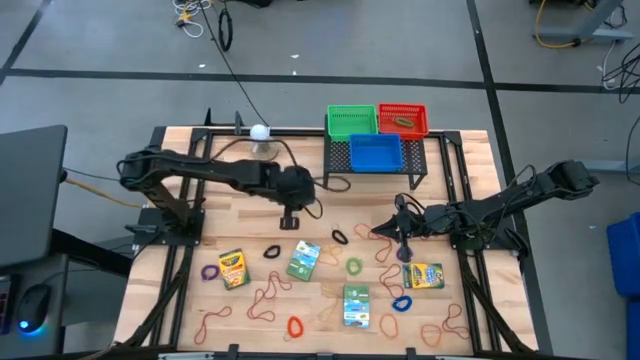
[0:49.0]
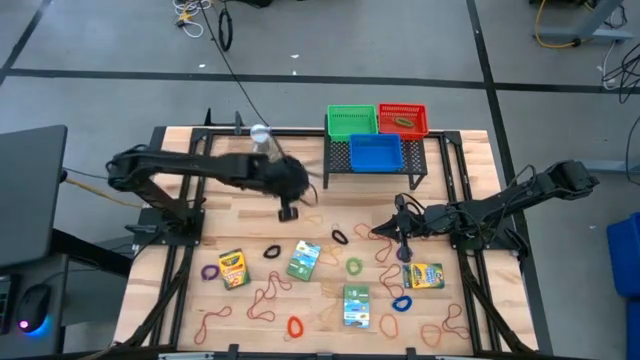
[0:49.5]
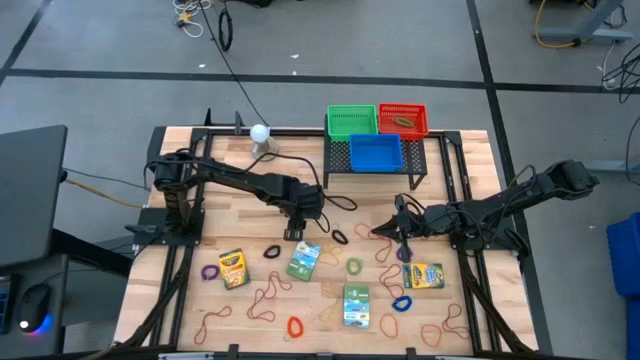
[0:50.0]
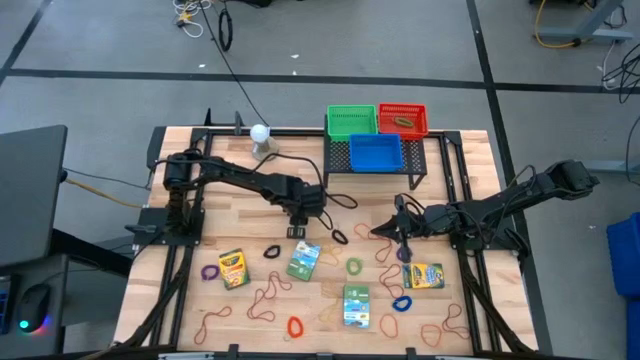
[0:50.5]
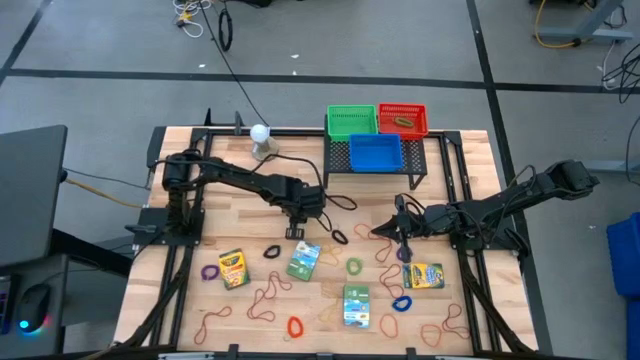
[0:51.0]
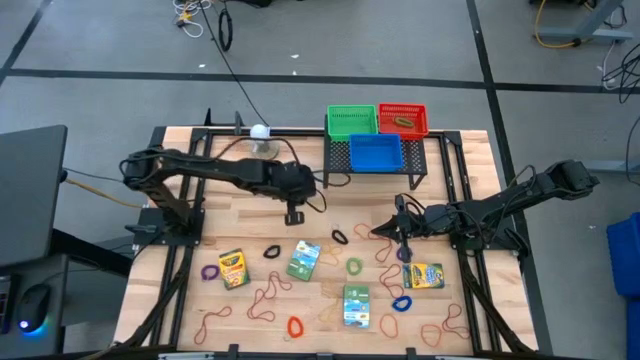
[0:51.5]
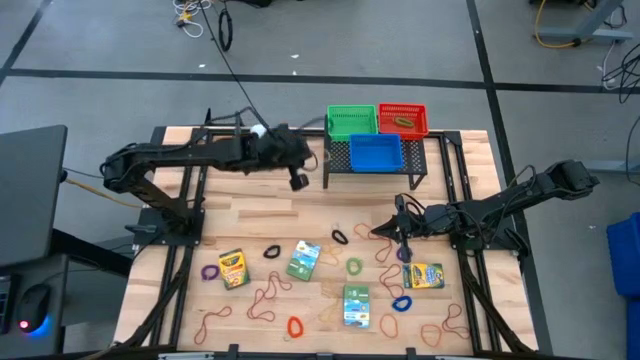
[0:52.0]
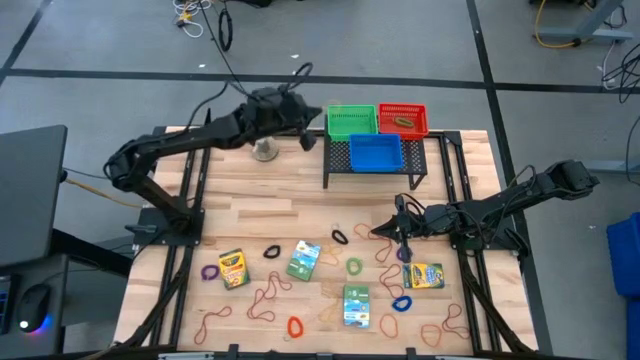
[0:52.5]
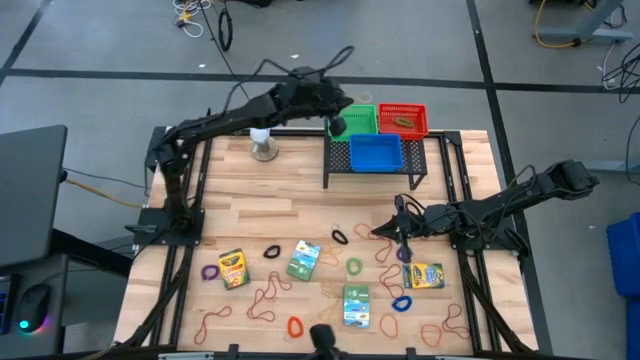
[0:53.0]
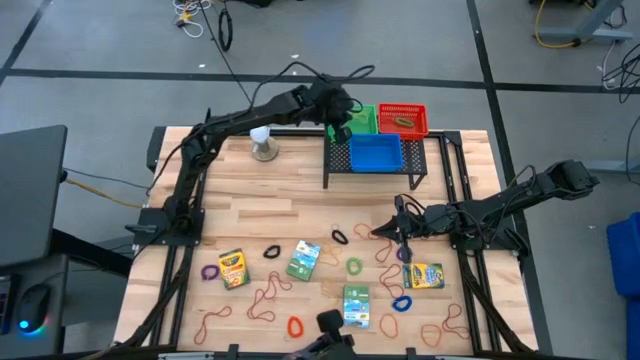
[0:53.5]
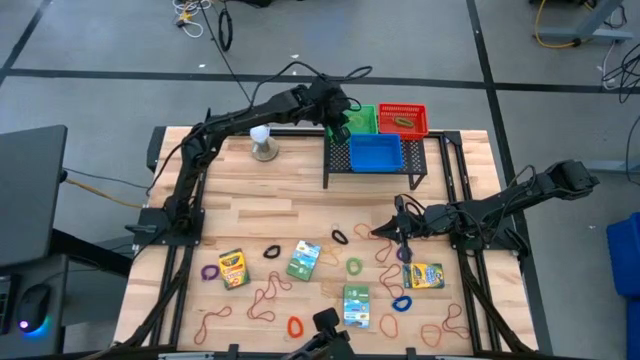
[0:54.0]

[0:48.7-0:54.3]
Task: Pick & Place Office Desk Supplies
Put the yellow rubber band into the green bin

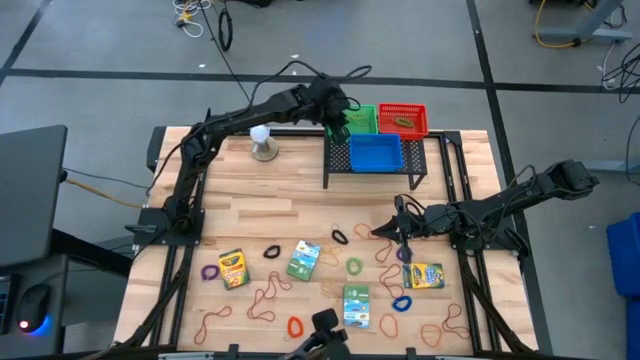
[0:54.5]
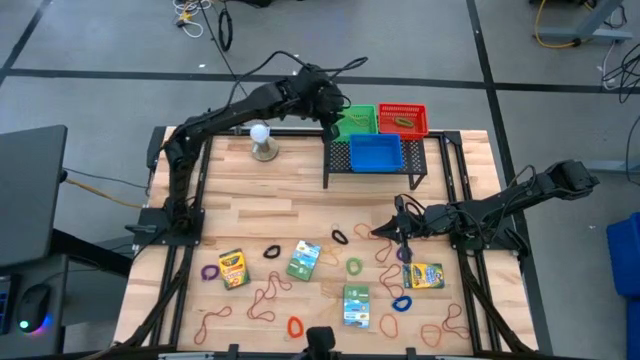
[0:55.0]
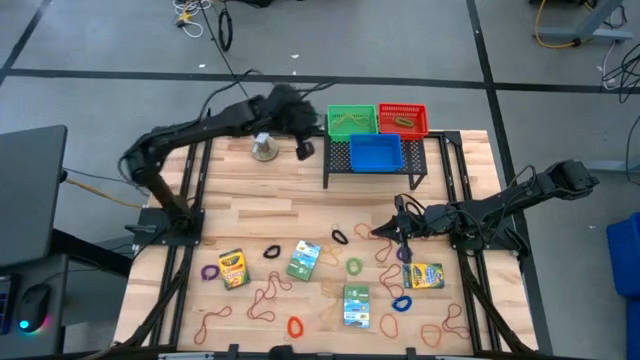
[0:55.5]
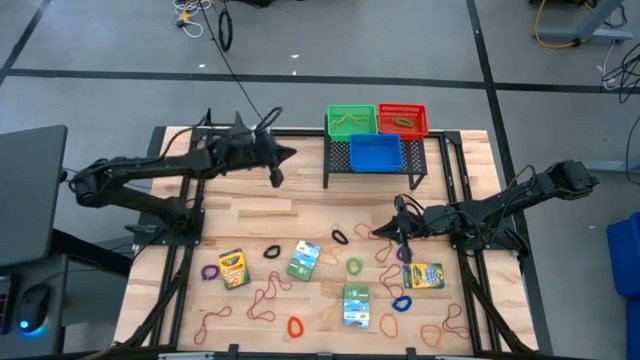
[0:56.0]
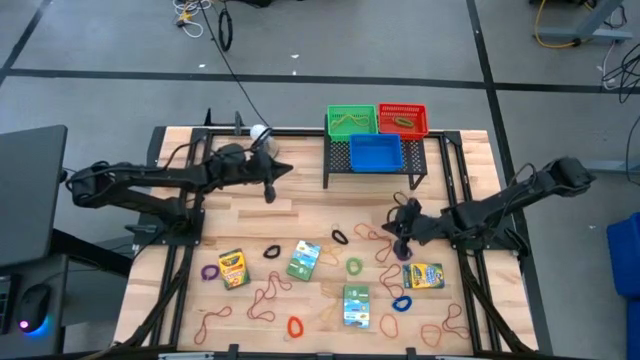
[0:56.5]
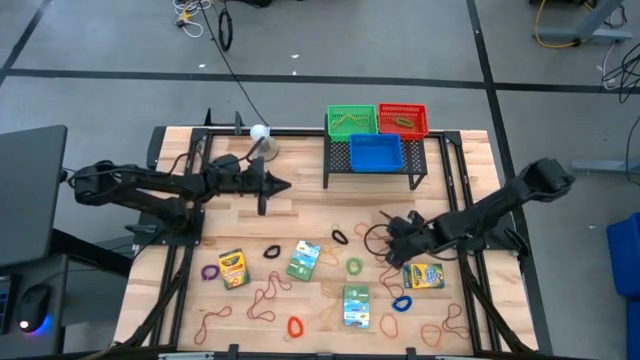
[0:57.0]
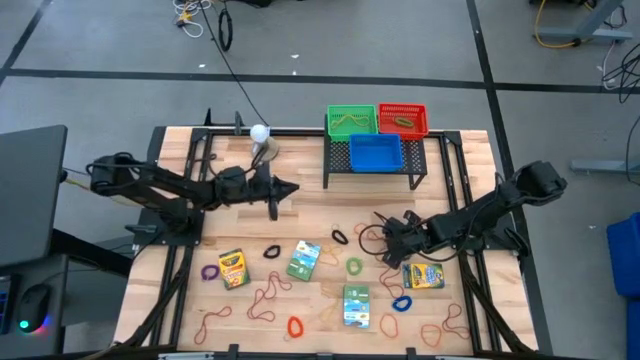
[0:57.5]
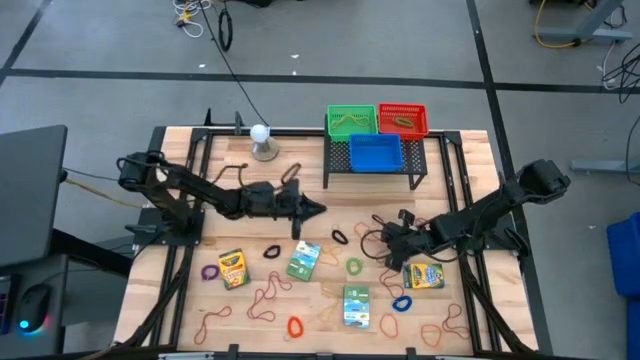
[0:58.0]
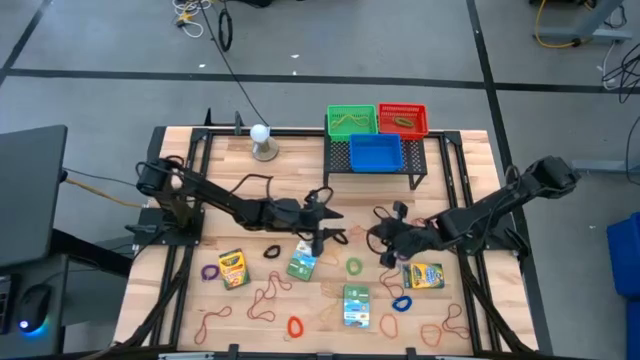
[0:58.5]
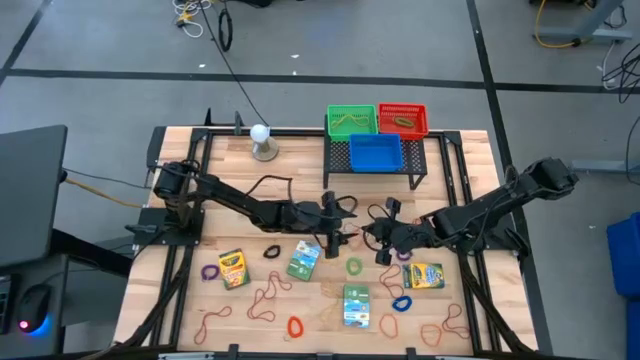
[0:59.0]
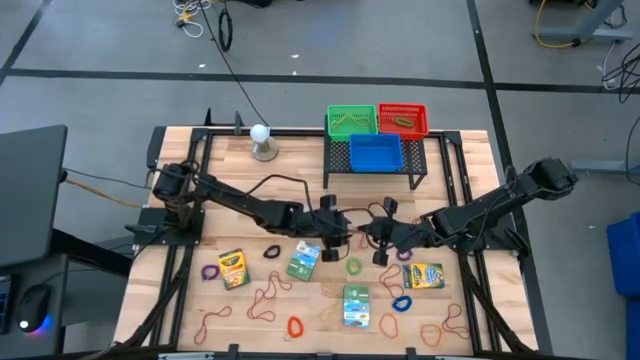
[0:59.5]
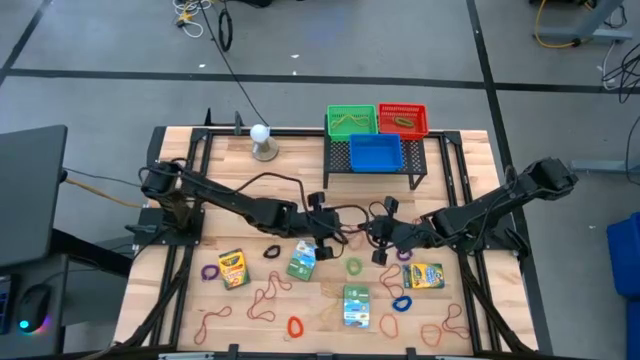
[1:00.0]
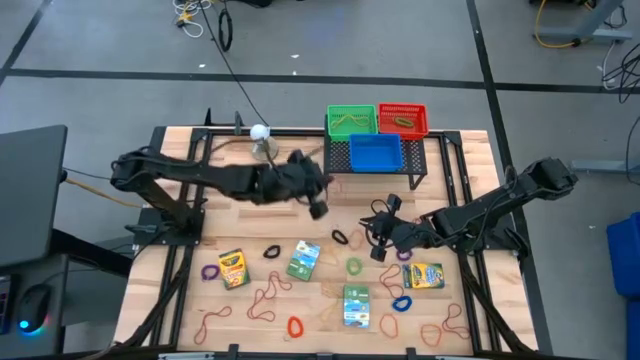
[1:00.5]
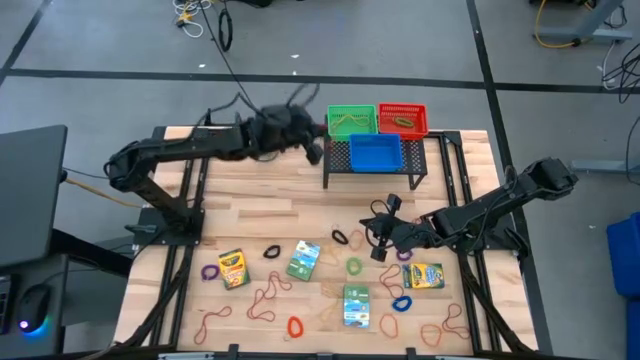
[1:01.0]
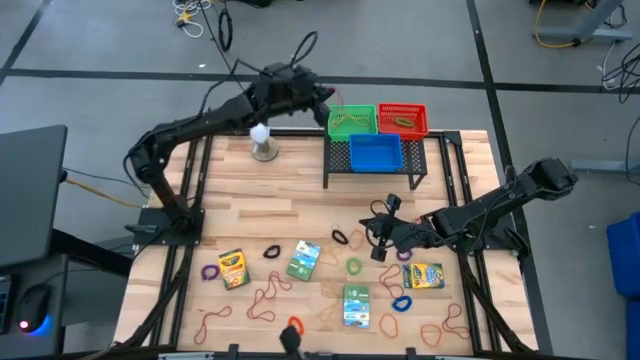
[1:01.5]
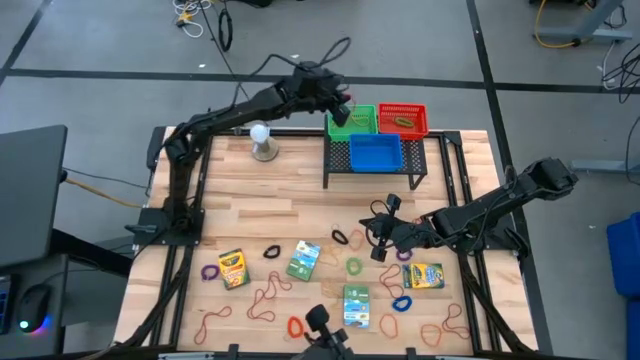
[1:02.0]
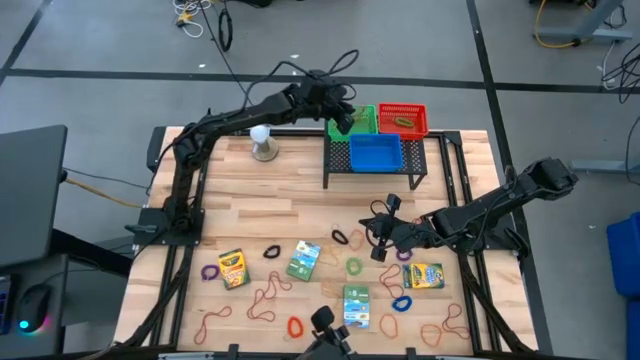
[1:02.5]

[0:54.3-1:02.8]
Put the red rubber band into the green bin

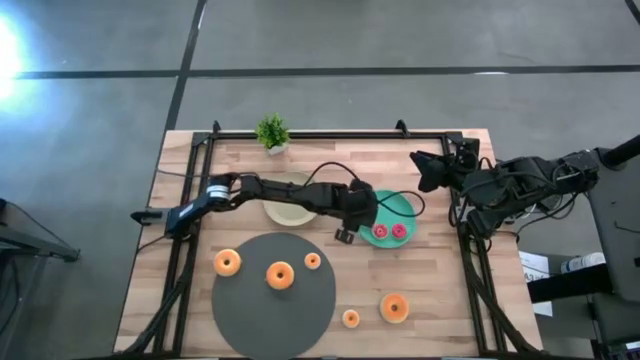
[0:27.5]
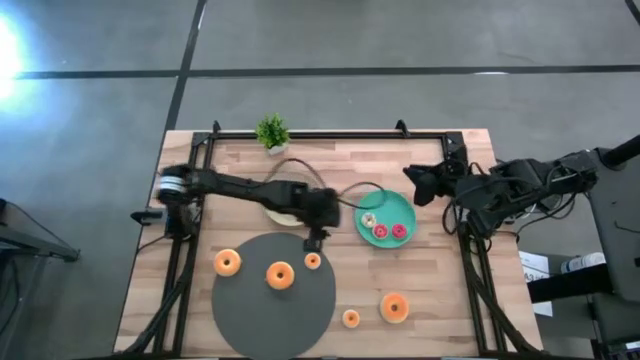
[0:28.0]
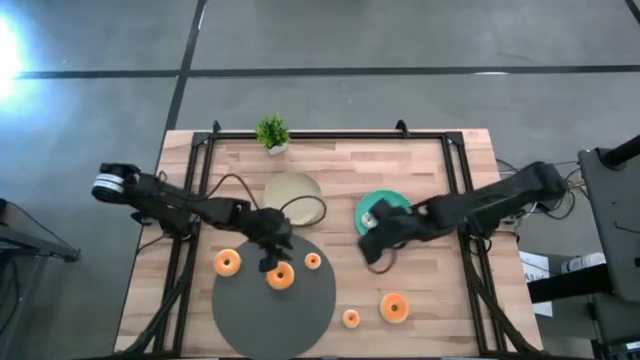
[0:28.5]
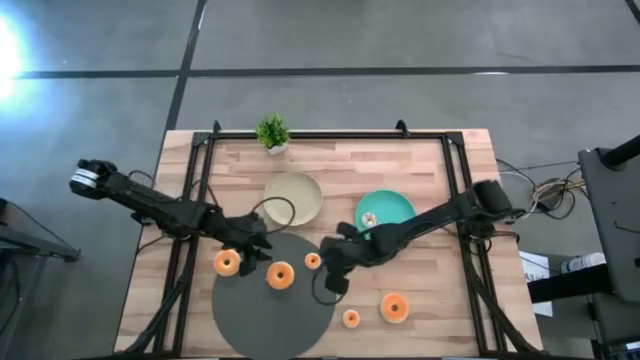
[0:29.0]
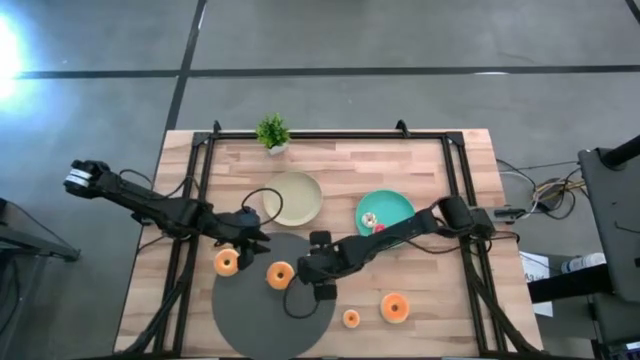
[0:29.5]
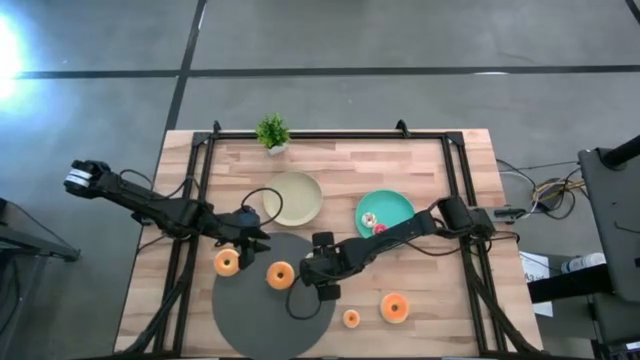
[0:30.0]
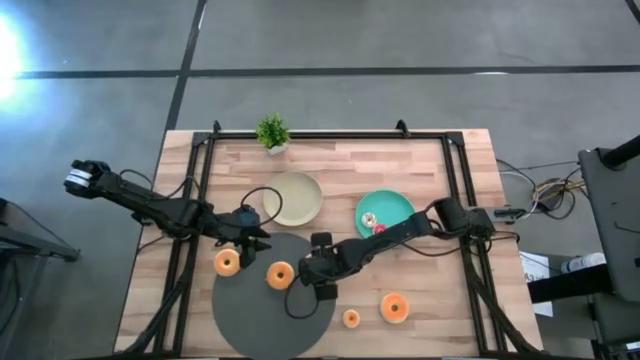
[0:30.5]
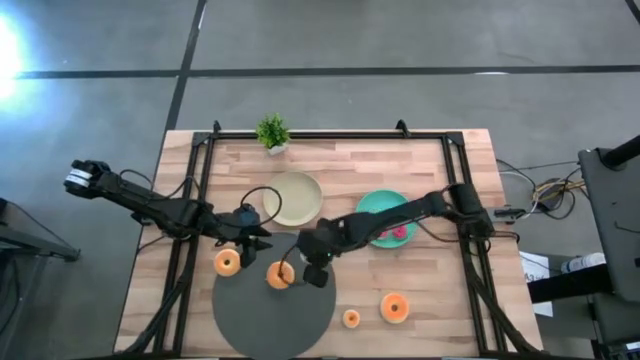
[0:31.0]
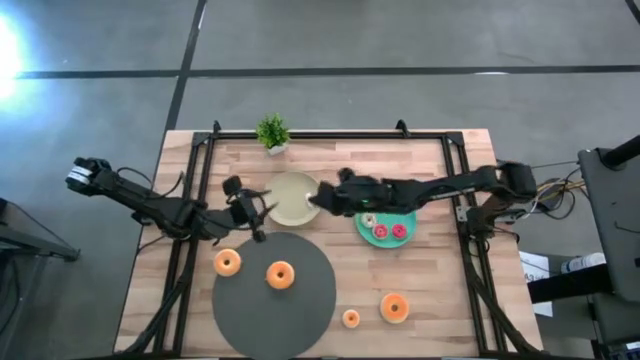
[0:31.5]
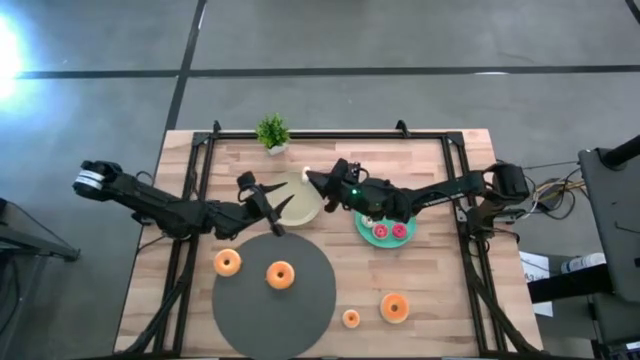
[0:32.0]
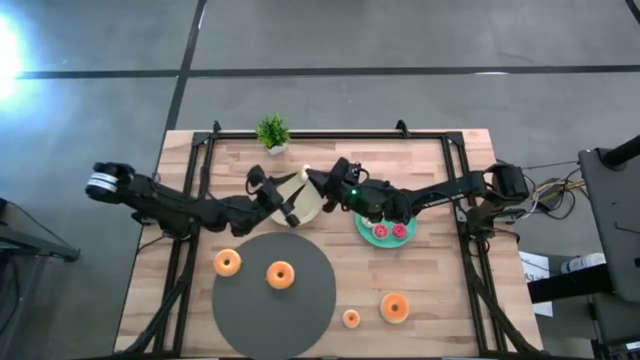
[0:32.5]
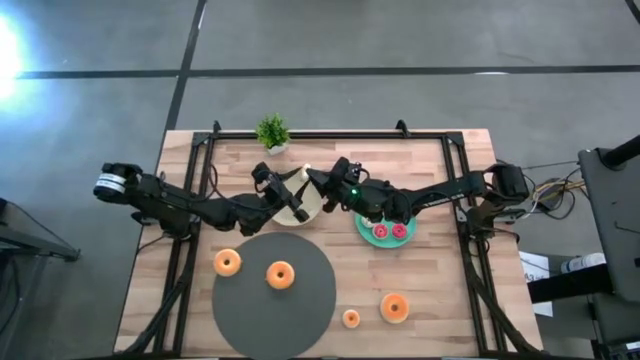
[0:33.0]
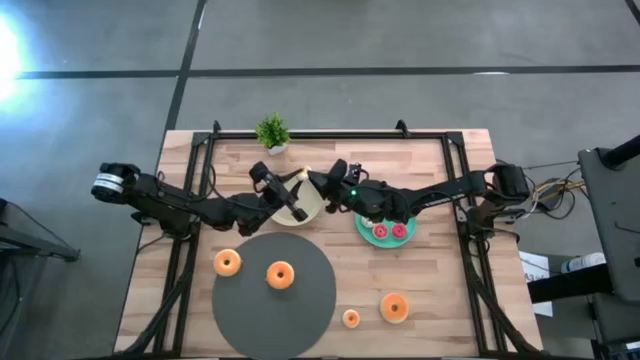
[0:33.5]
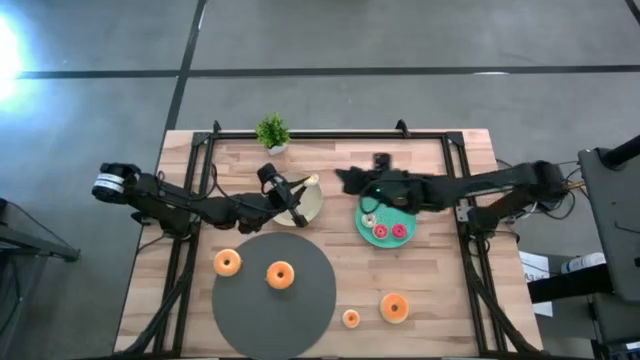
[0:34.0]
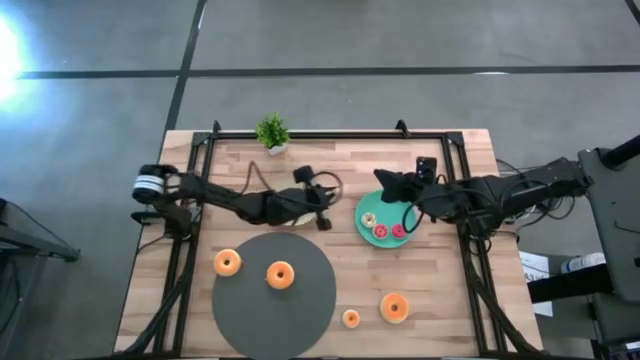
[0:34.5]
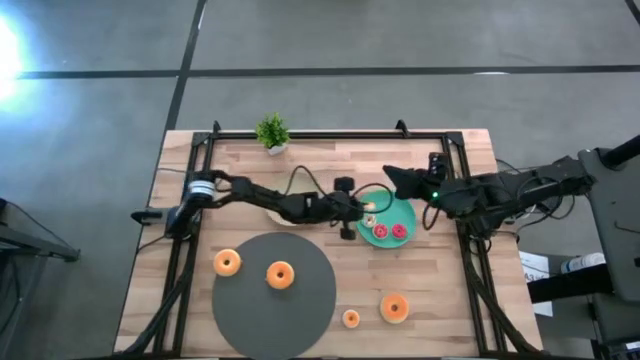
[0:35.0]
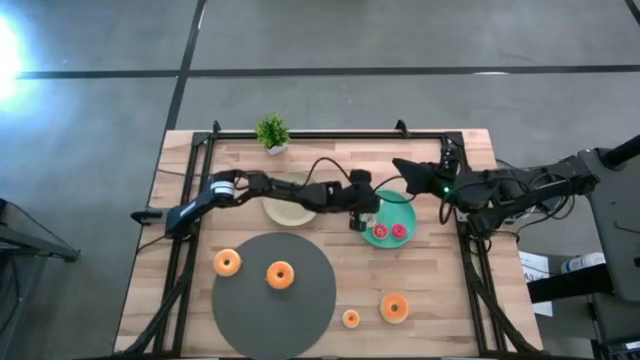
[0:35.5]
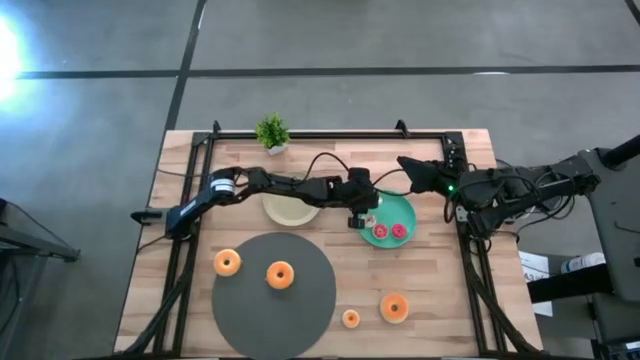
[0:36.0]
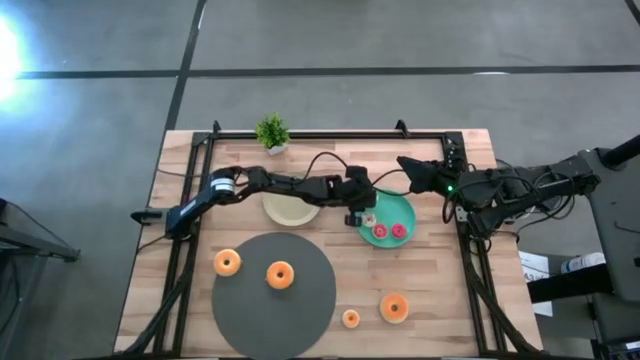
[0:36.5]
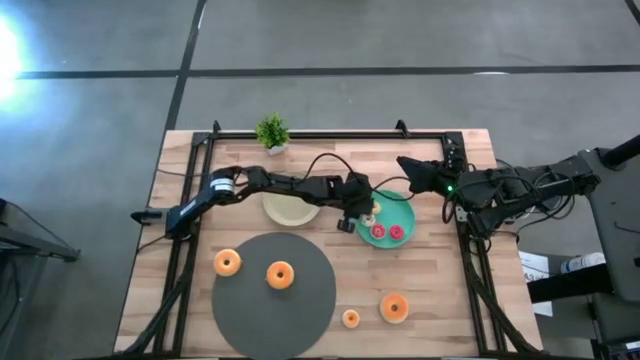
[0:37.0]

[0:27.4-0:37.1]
Task: Pick & Place donuts
Put the small yellow donut on the blue plate
